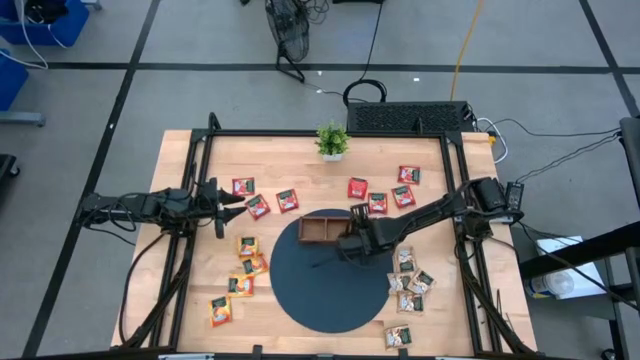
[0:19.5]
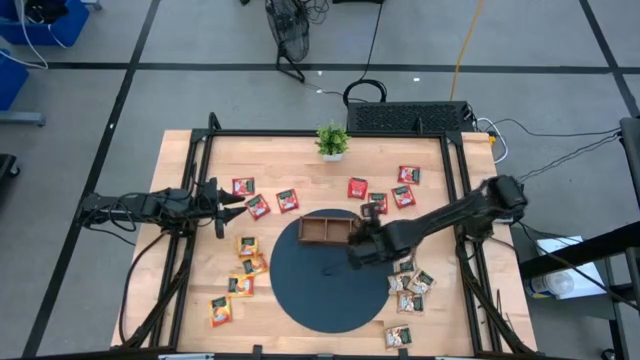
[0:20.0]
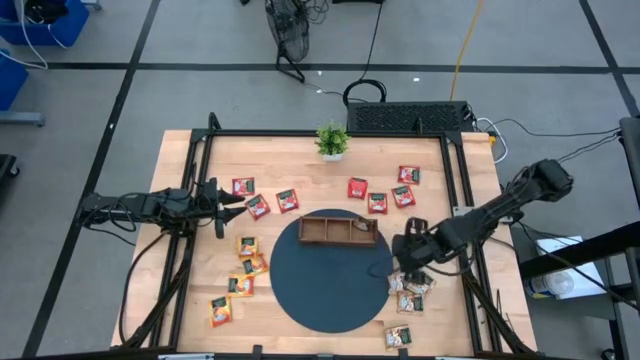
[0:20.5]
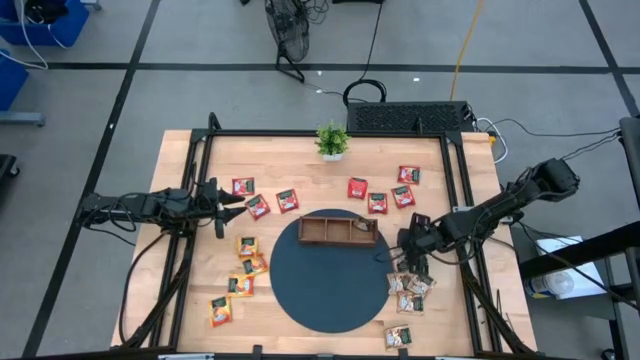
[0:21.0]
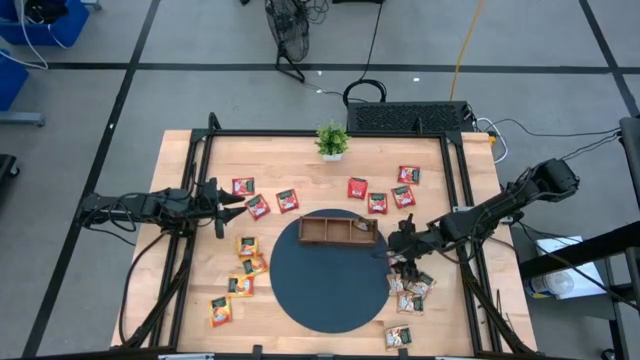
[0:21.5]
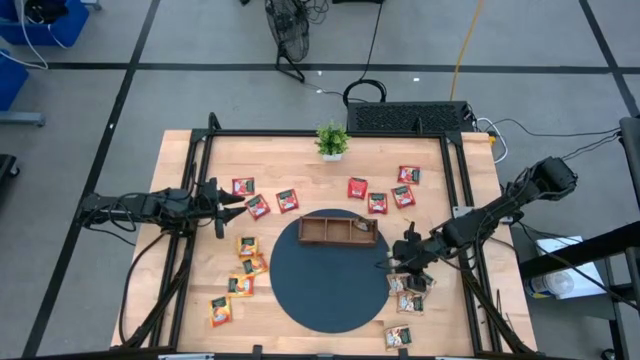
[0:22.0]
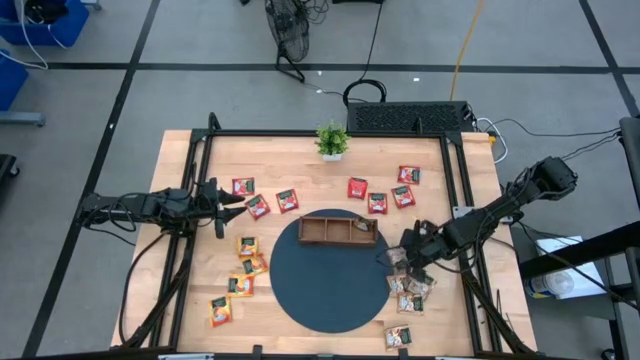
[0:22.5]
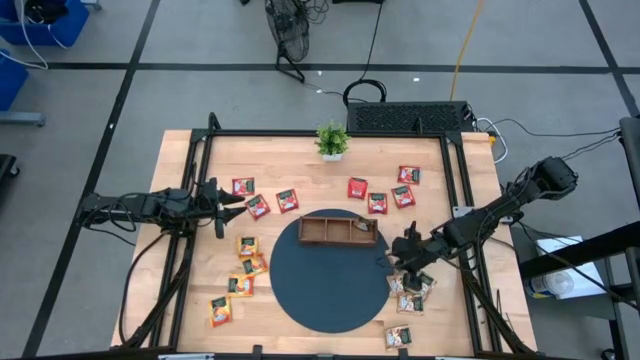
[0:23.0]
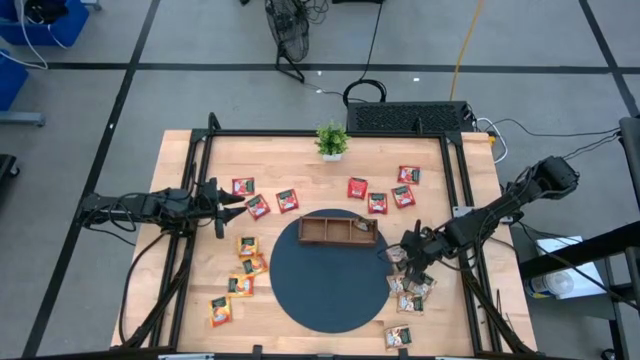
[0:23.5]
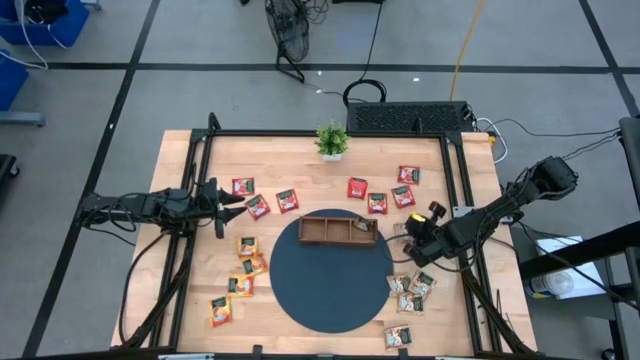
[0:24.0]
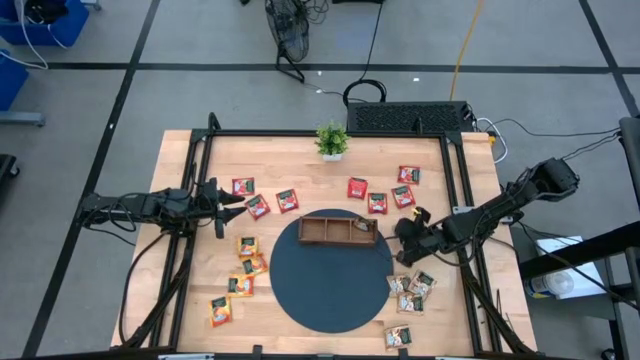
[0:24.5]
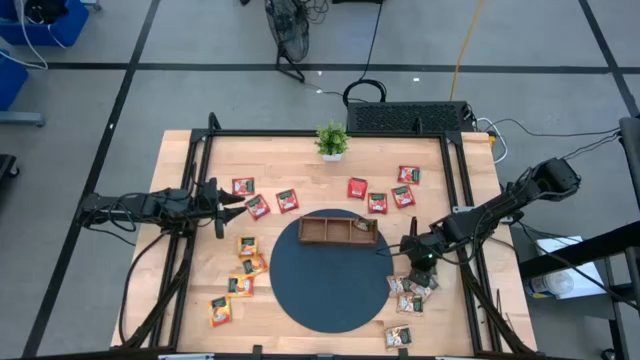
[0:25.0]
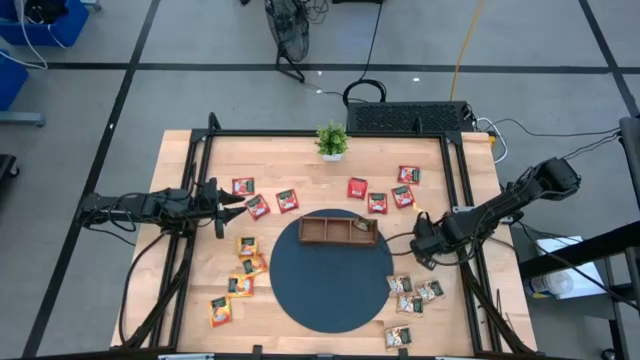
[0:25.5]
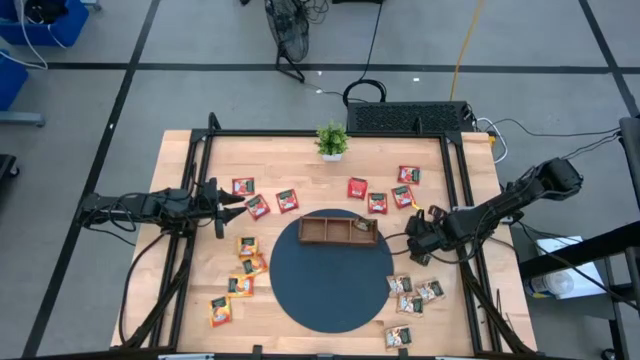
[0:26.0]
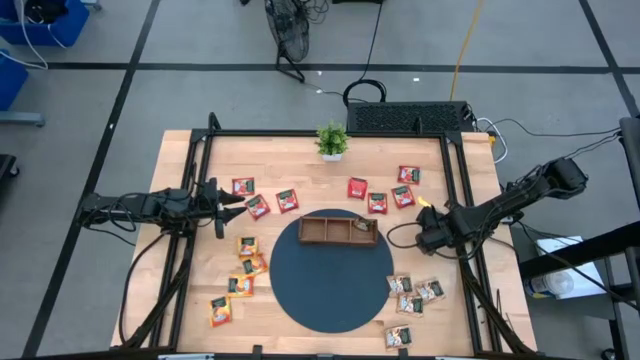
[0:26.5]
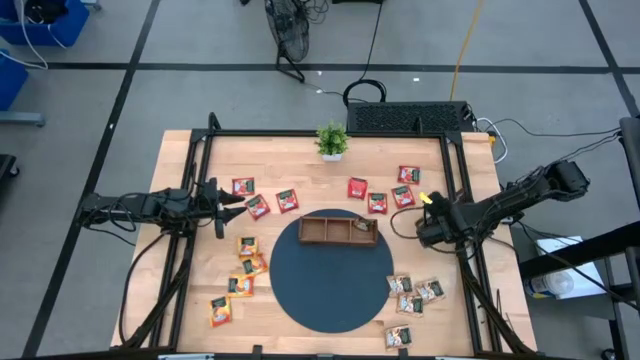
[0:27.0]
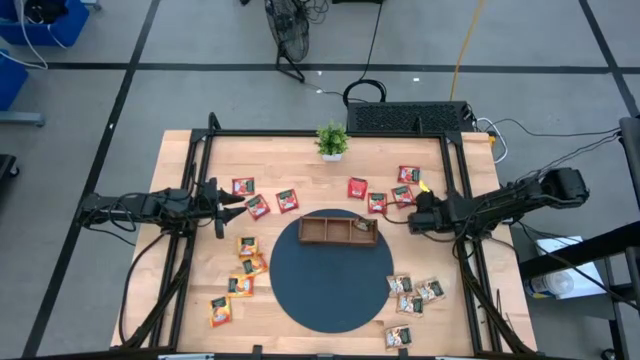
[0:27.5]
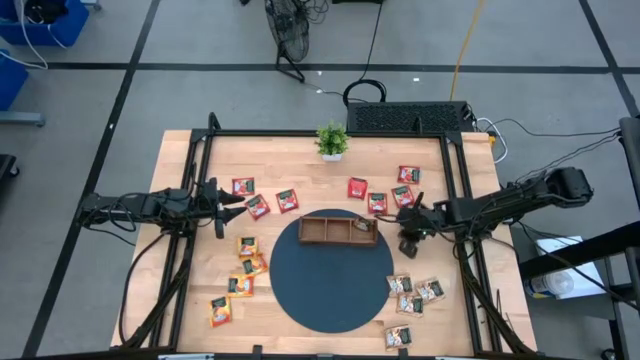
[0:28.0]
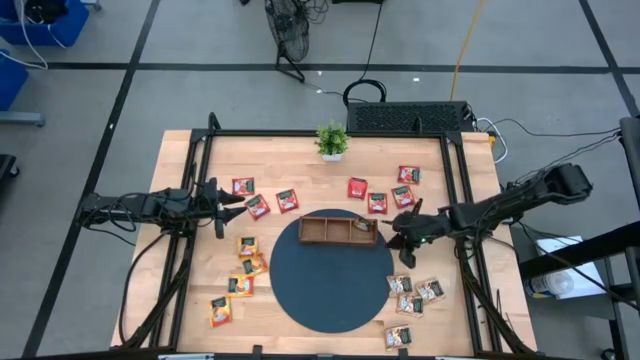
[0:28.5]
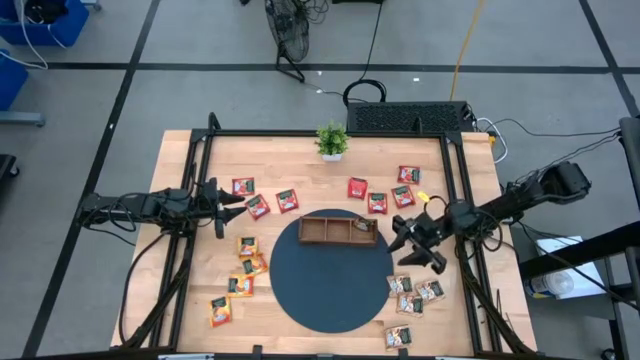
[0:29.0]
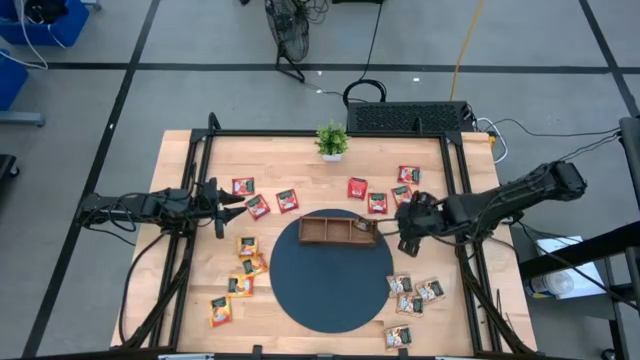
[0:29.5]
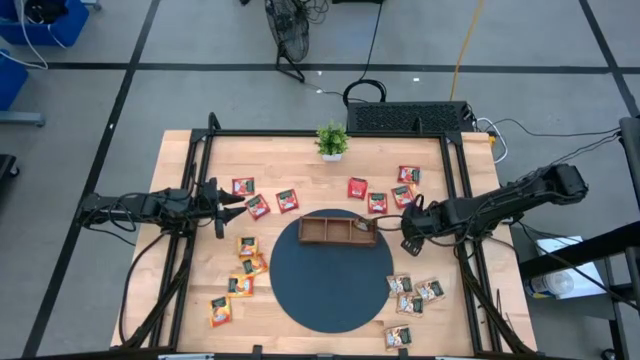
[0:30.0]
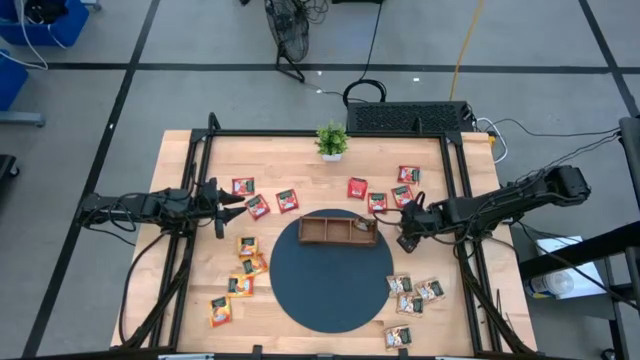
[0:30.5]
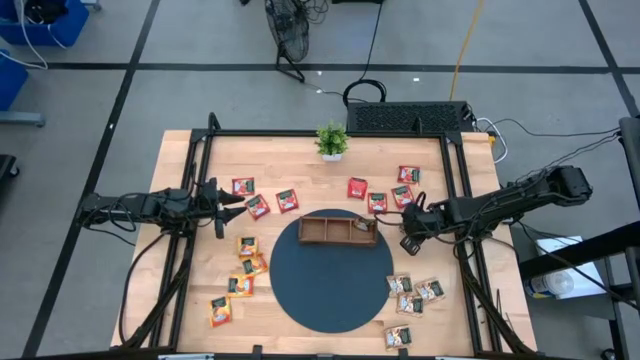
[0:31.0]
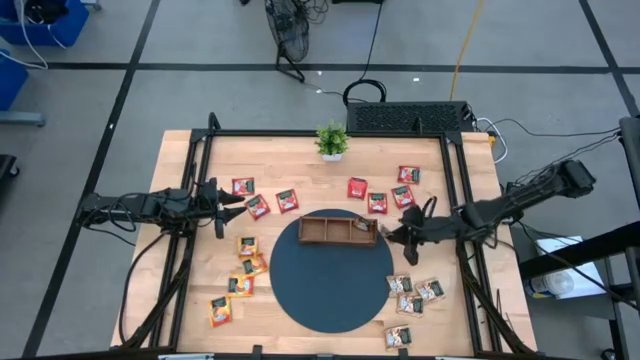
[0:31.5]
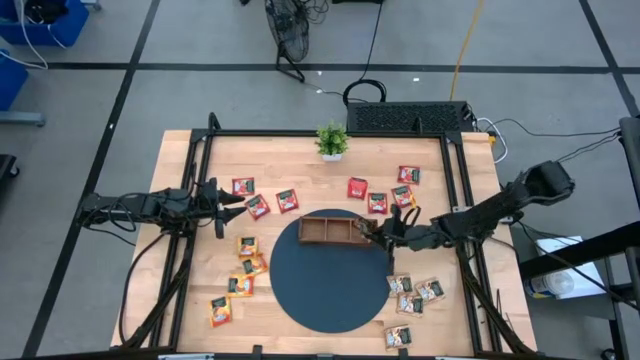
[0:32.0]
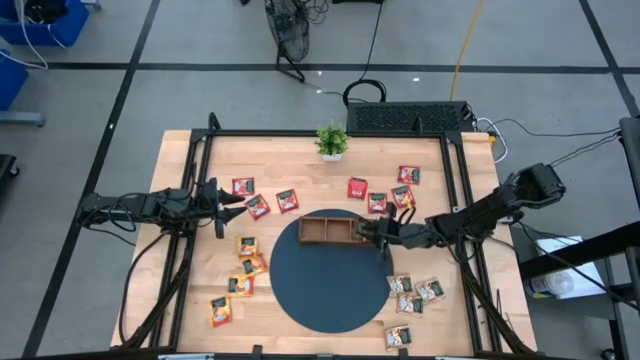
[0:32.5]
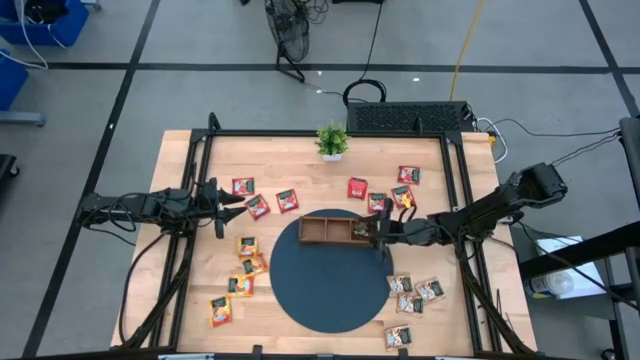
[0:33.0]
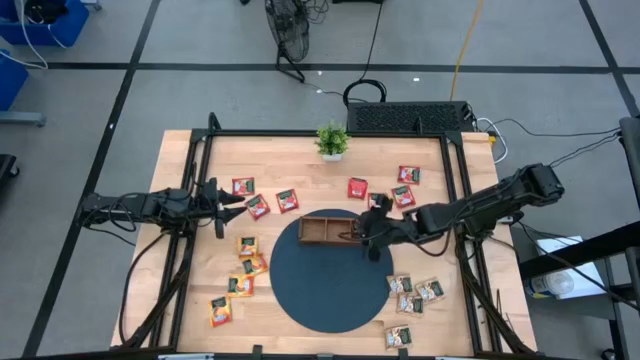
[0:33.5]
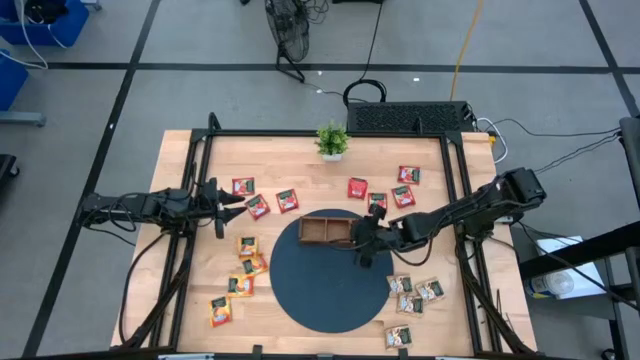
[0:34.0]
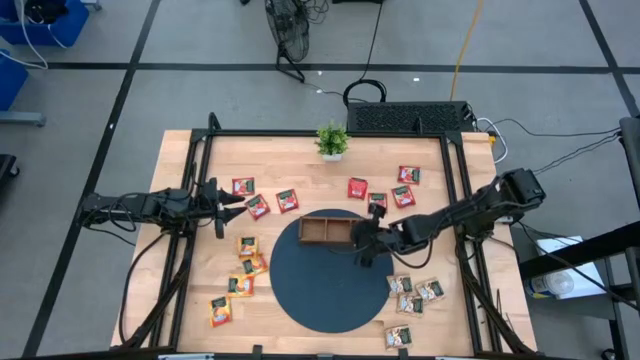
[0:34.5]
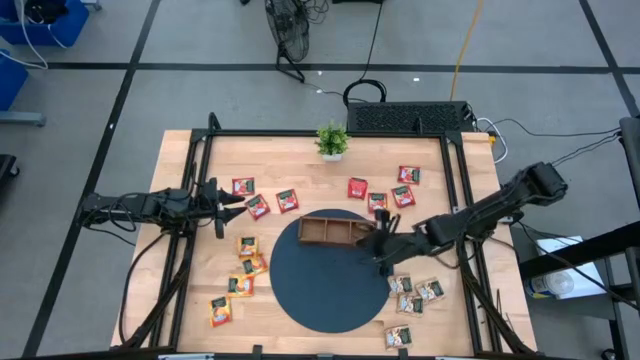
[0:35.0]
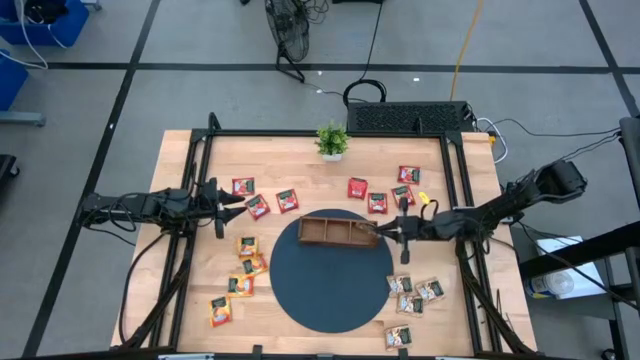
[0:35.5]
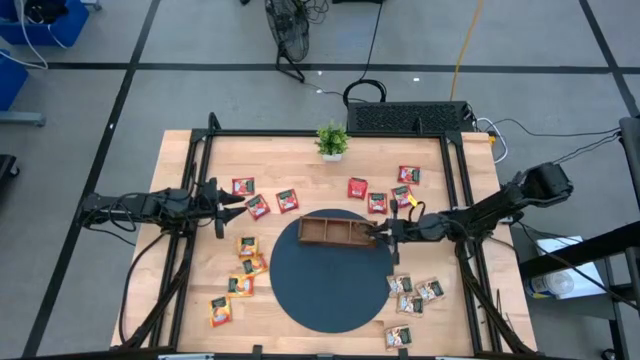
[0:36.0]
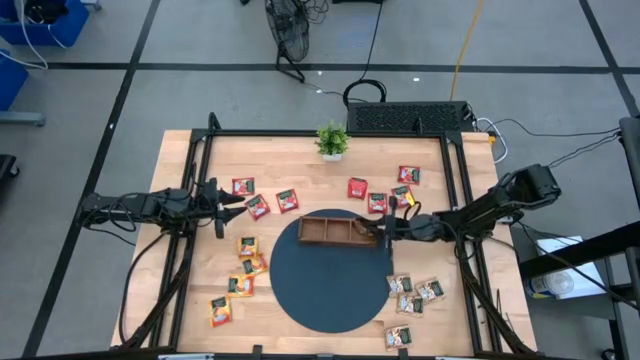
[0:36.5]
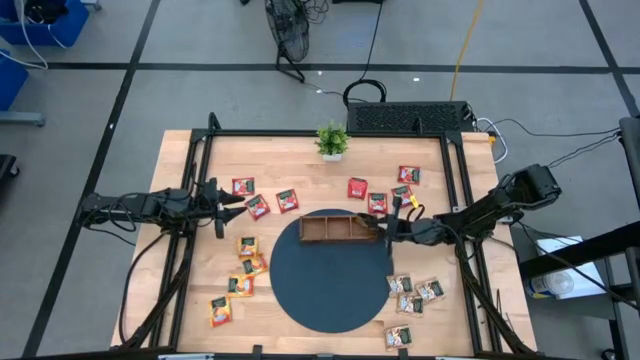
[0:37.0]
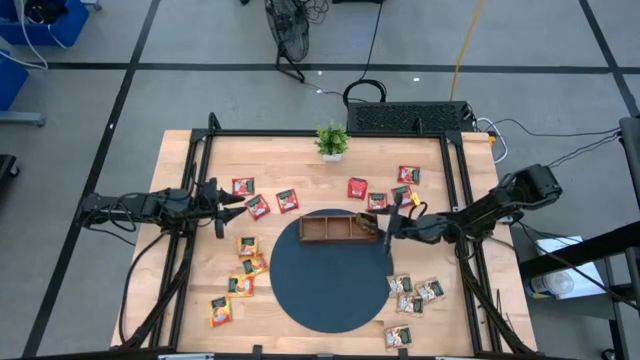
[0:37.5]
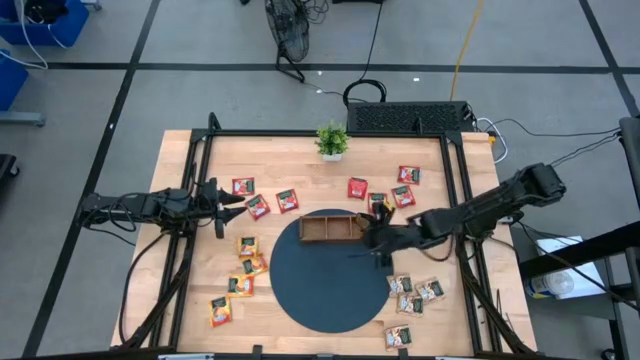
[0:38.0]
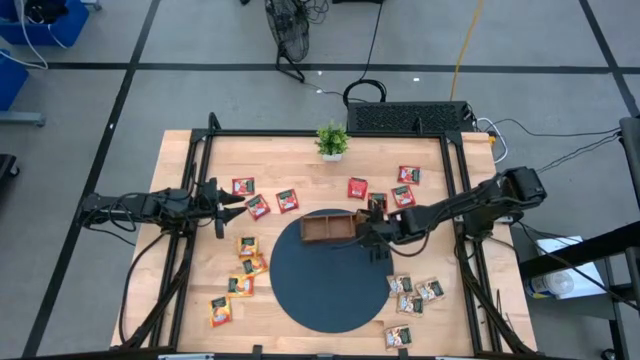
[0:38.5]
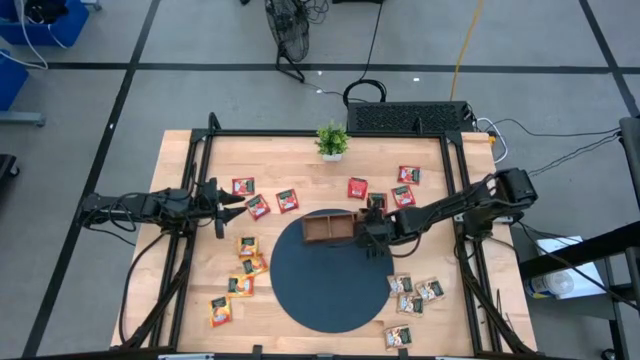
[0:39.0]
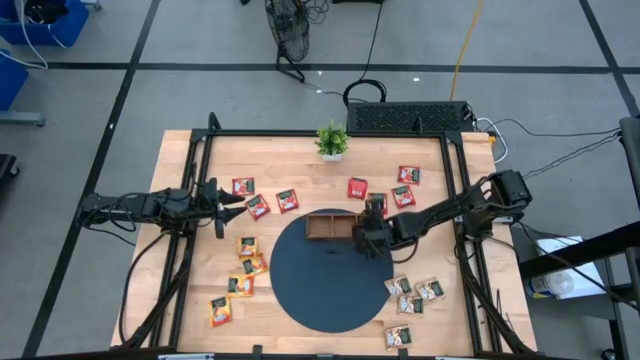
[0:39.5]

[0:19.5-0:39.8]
Task: Pick & Place Tea
Put the brown tea bag into the right slot of the wooden organizer

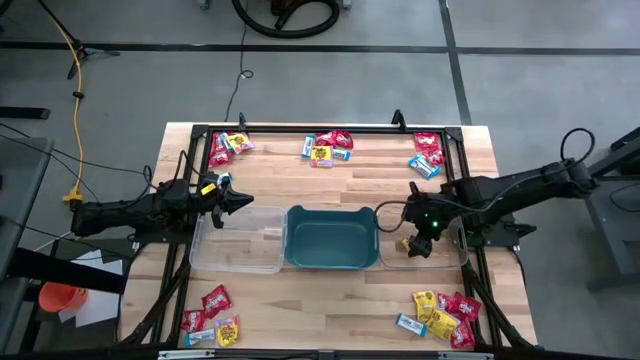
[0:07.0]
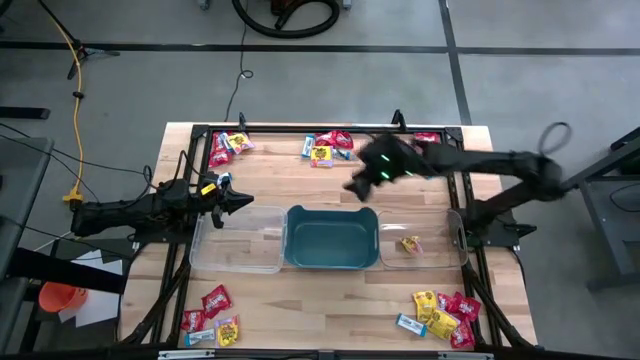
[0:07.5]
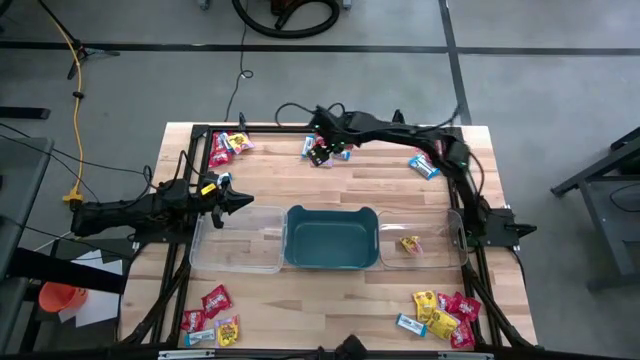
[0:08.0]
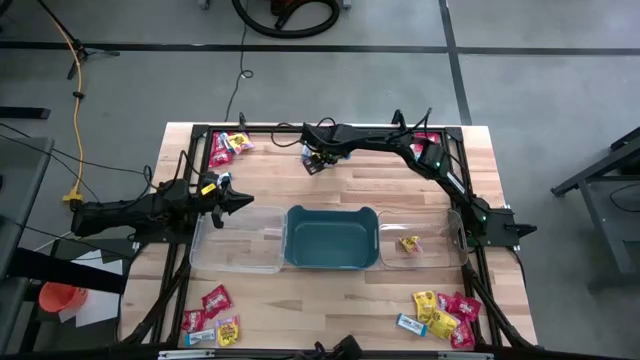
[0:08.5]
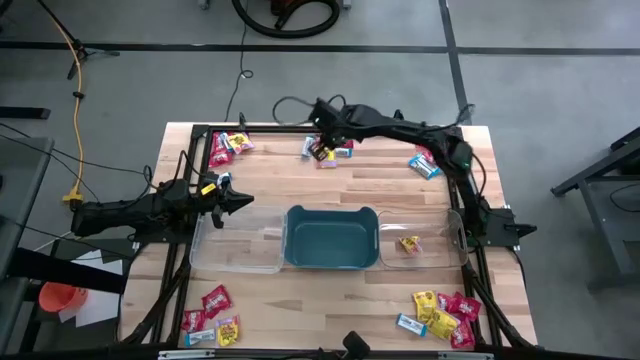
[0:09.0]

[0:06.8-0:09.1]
Task: Sort candy
Put the yellow candy into the right transparent bin
